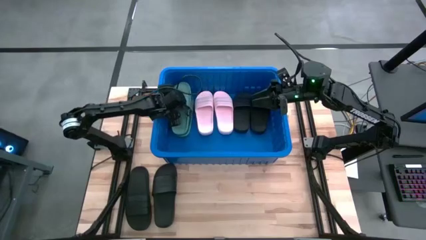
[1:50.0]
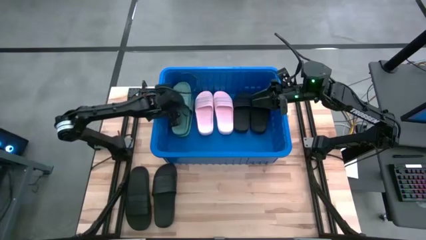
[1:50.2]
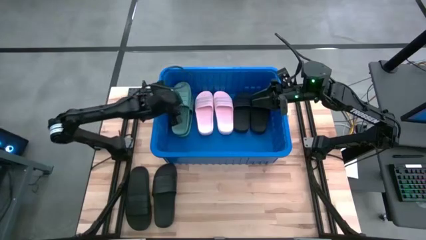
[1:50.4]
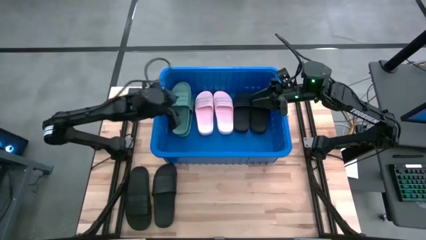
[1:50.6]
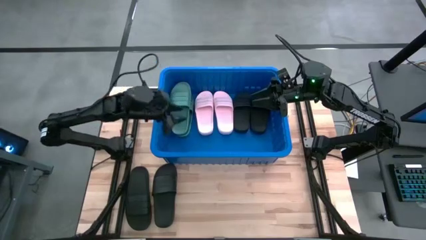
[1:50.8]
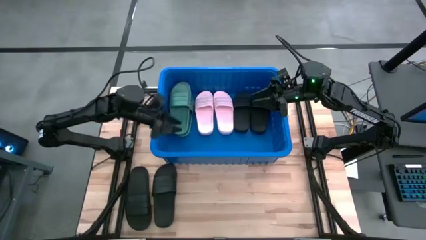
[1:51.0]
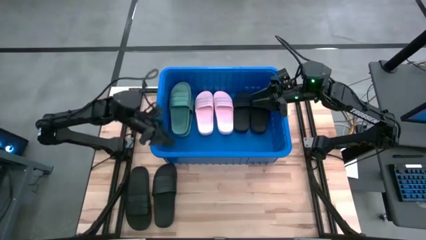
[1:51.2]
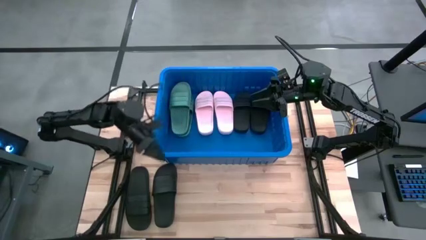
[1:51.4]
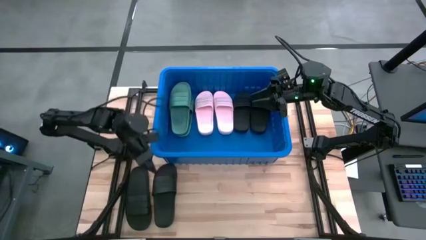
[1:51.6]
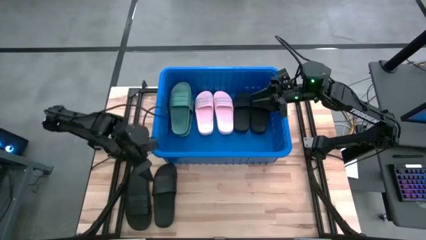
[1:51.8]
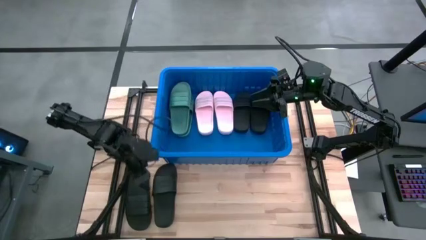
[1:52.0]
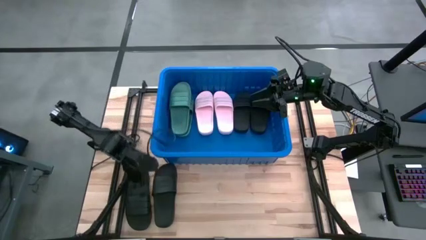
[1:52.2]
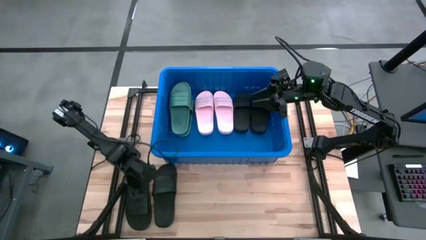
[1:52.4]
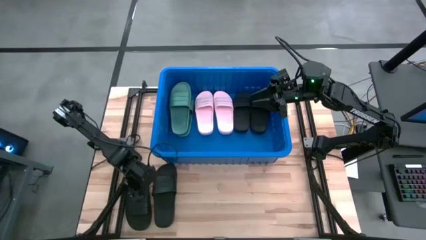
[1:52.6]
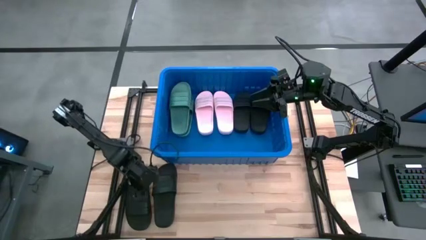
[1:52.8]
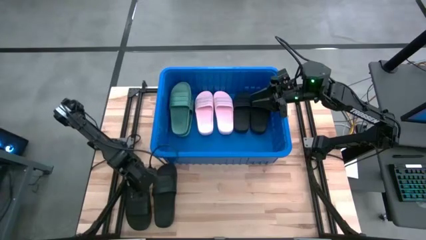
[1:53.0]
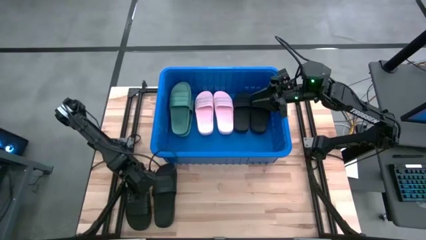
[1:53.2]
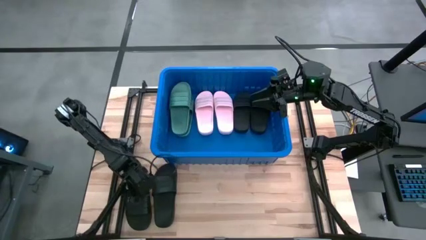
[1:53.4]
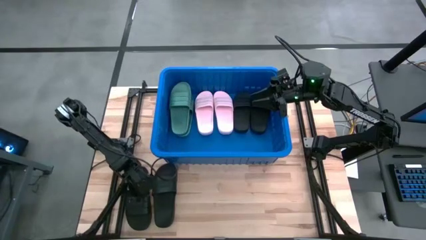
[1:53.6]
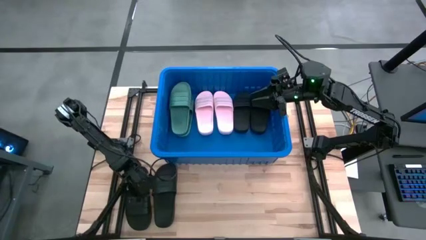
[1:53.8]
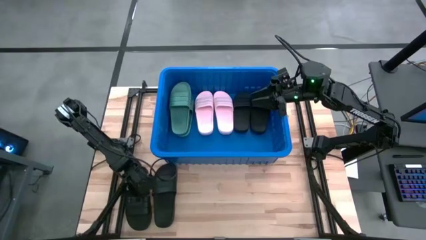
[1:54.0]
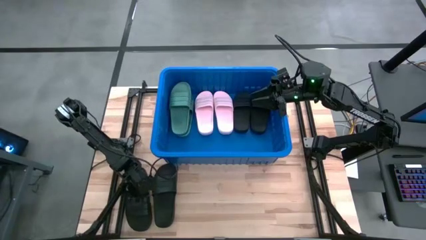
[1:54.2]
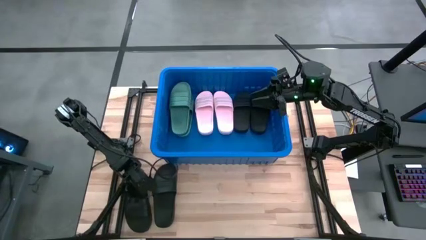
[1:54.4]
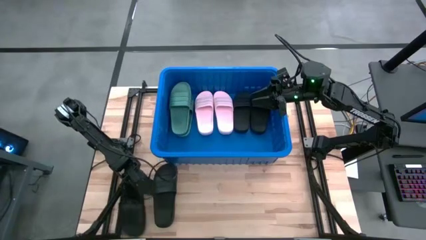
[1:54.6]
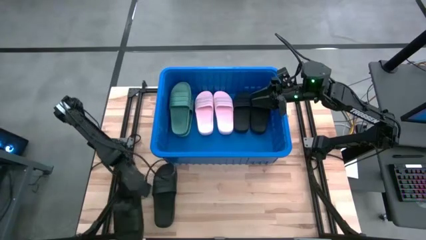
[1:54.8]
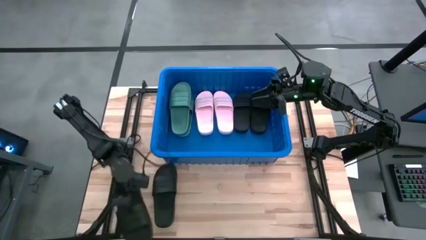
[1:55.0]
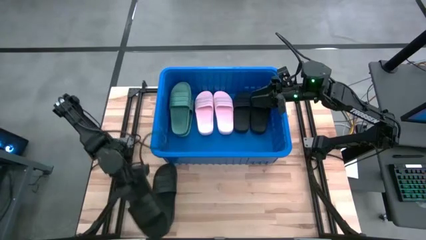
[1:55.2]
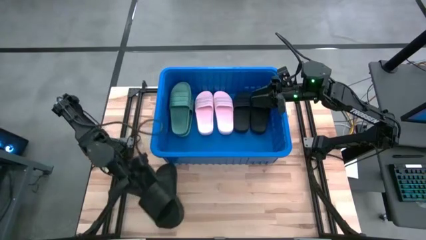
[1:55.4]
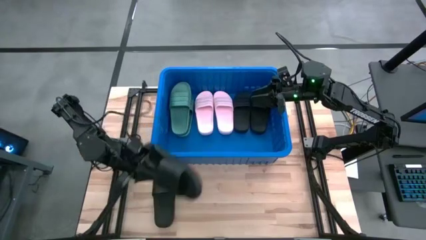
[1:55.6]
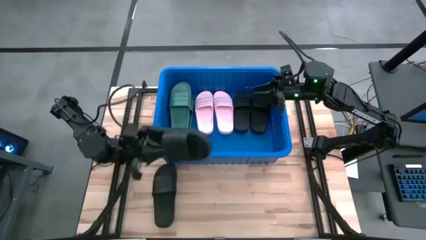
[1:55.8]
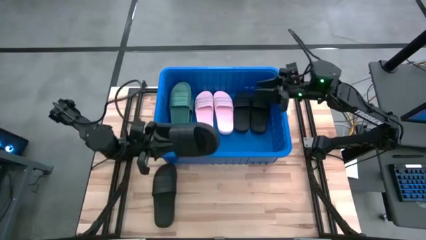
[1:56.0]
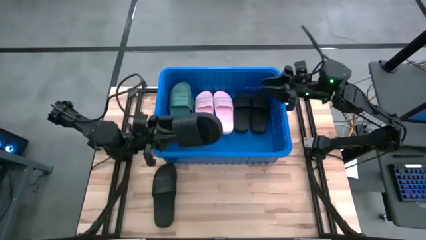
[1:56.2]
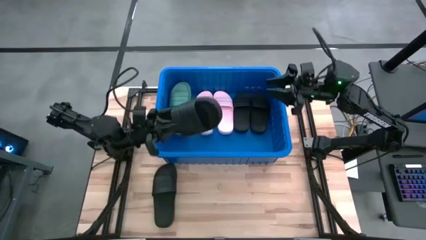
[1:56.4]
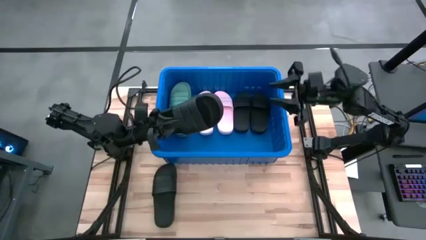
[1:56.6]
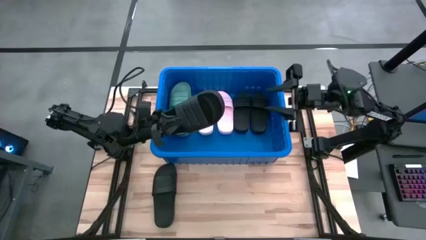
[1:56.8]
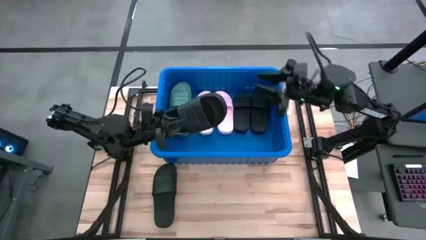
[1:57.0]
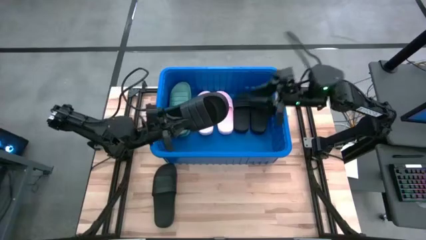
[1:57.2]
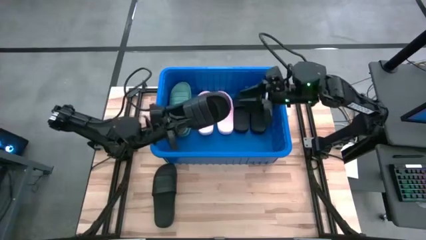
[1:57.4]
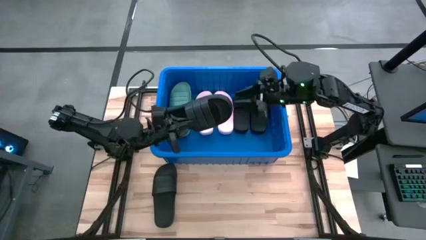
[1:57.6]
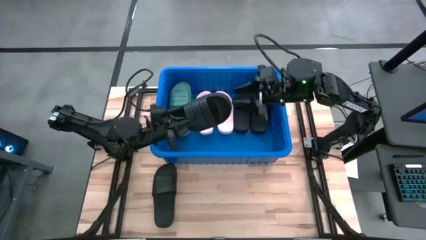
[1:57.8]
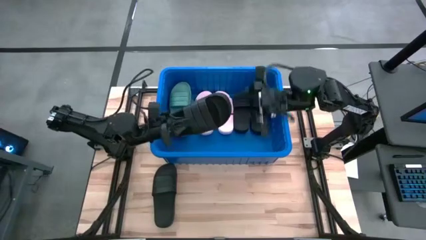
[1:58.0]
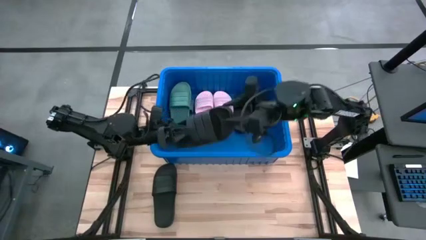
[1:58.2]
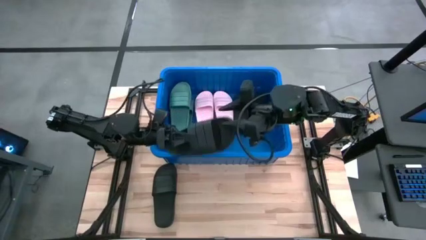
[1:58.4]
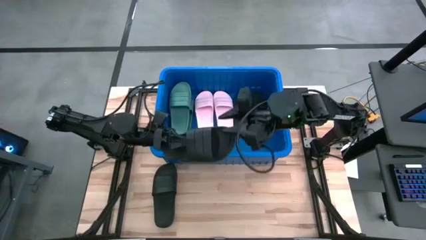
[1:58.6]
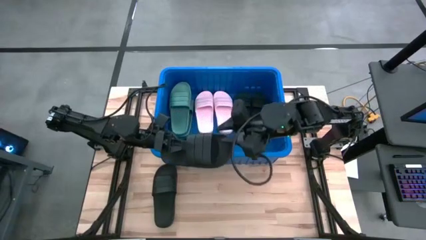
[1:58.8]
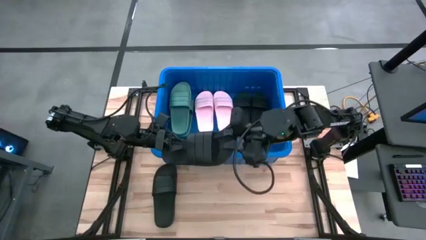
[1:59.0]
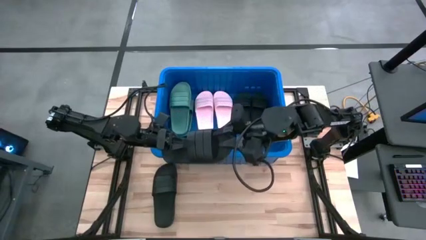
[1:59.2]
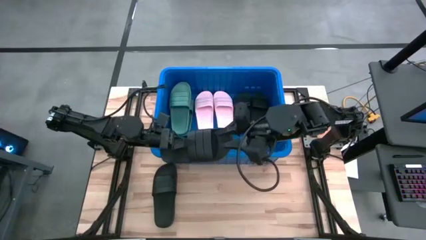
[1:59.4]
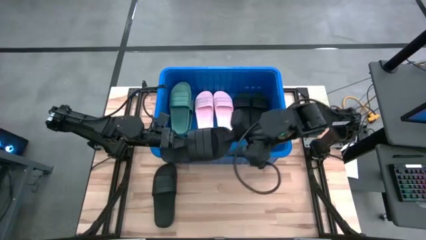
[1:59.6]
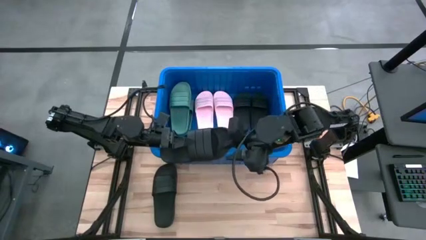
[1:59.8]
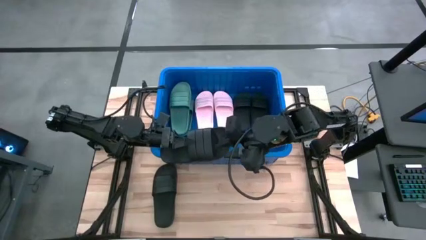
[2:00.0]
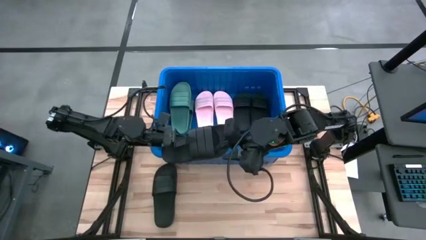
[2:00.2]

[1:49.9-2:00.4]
Task: Pick and place slides into bin
Put the black slipper into the blue bin

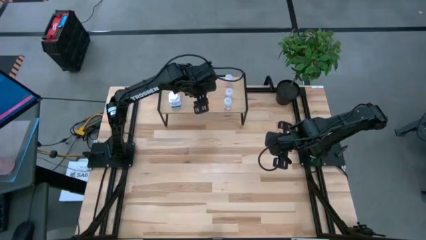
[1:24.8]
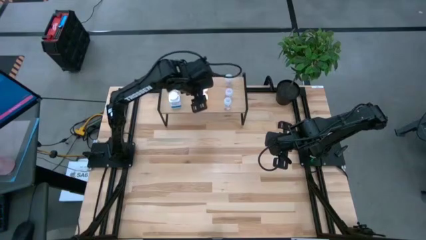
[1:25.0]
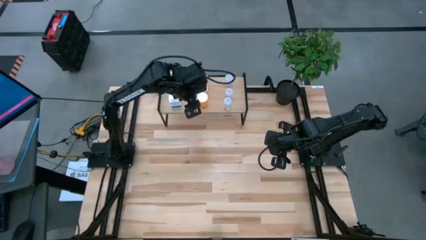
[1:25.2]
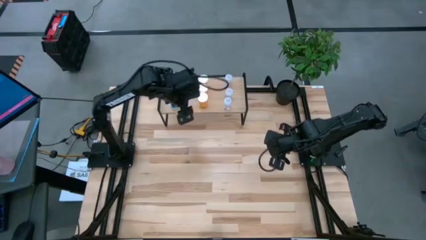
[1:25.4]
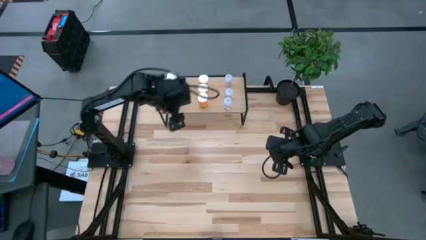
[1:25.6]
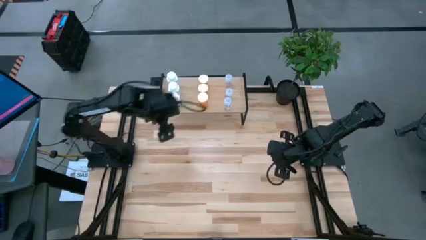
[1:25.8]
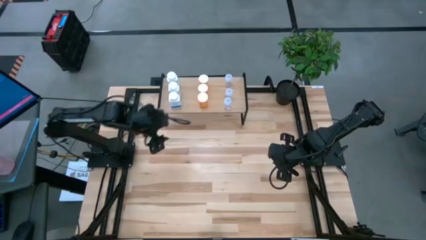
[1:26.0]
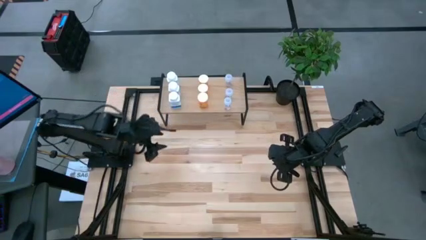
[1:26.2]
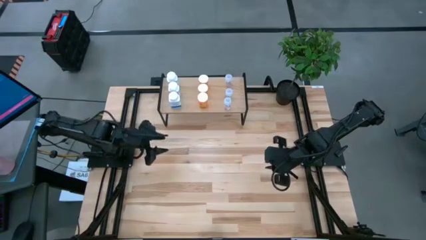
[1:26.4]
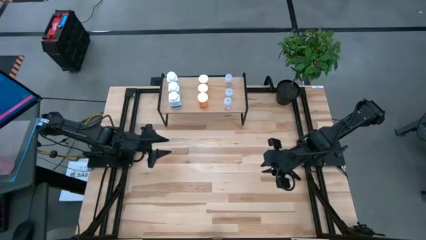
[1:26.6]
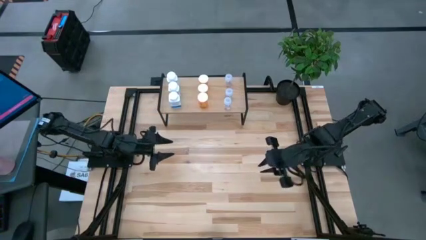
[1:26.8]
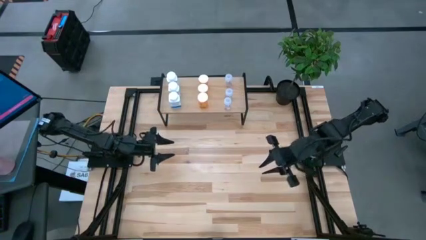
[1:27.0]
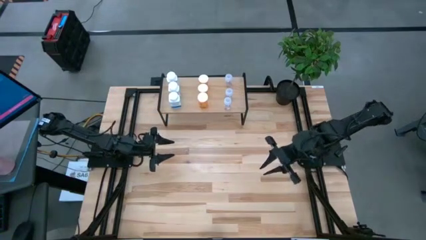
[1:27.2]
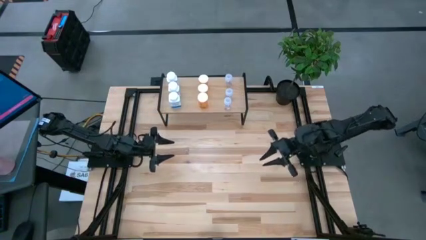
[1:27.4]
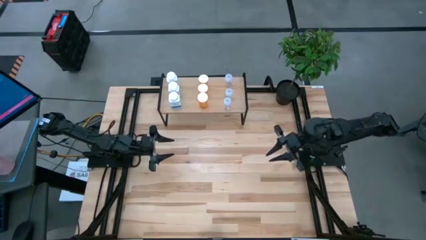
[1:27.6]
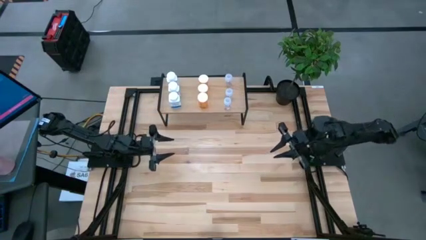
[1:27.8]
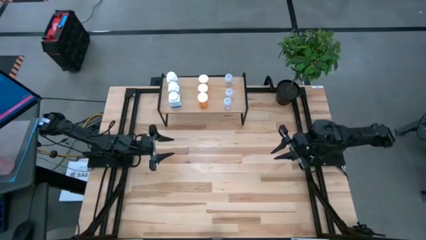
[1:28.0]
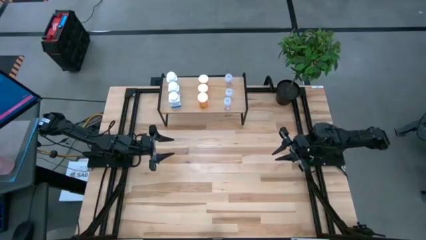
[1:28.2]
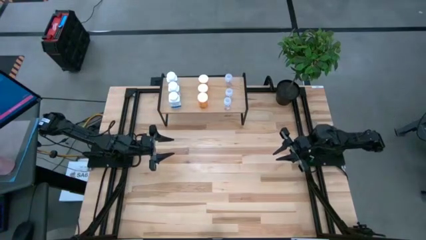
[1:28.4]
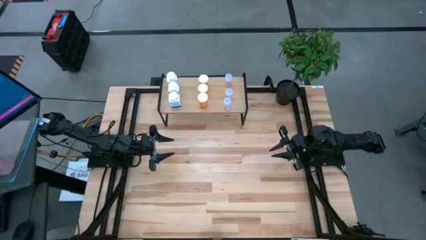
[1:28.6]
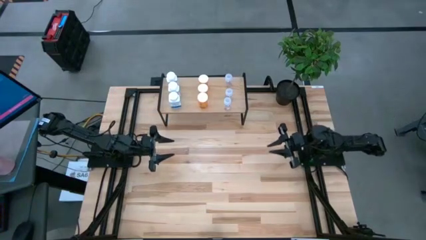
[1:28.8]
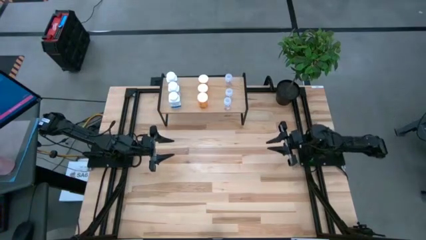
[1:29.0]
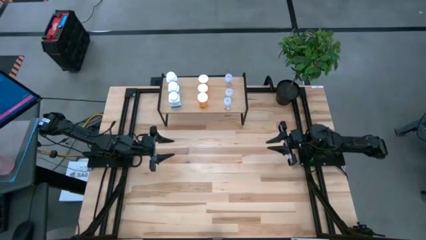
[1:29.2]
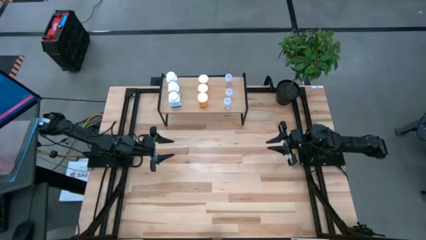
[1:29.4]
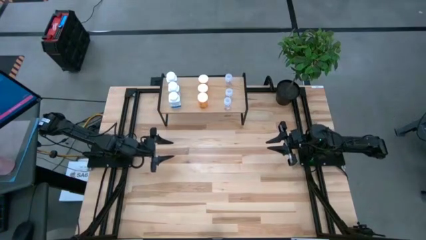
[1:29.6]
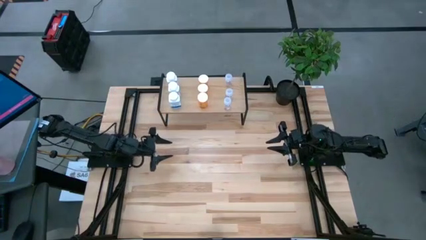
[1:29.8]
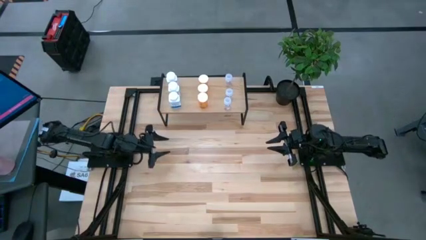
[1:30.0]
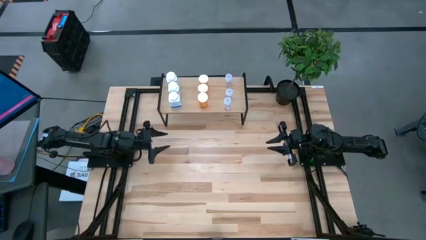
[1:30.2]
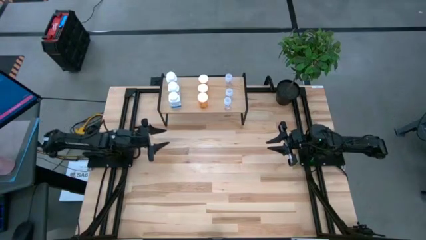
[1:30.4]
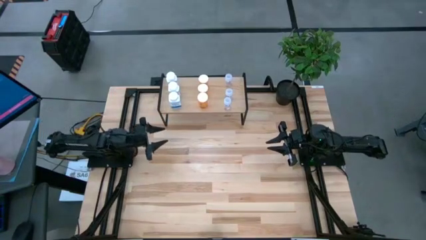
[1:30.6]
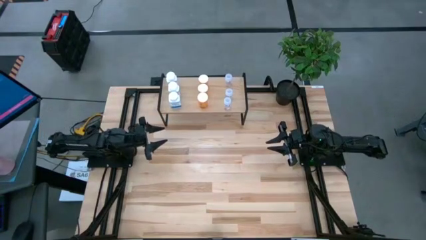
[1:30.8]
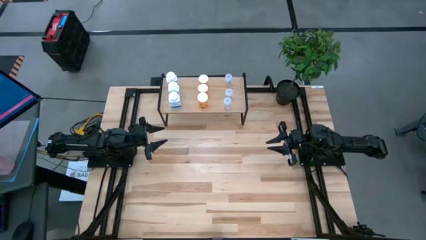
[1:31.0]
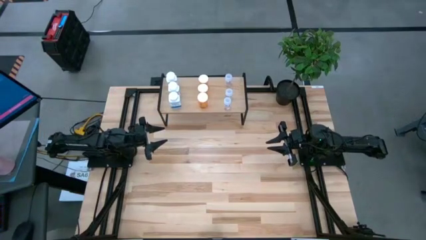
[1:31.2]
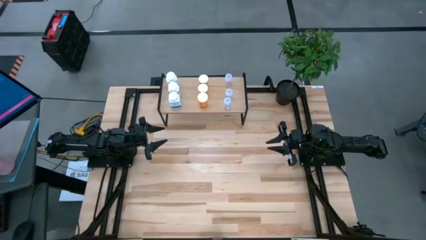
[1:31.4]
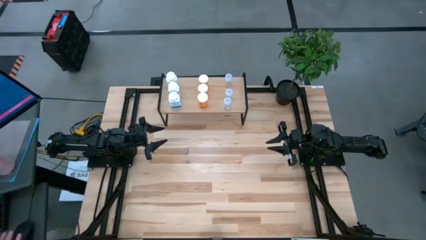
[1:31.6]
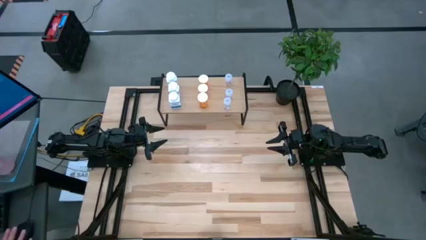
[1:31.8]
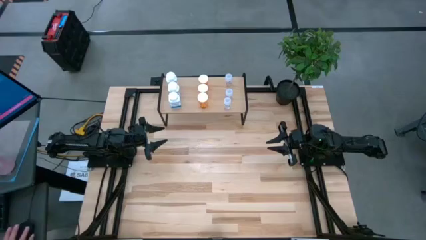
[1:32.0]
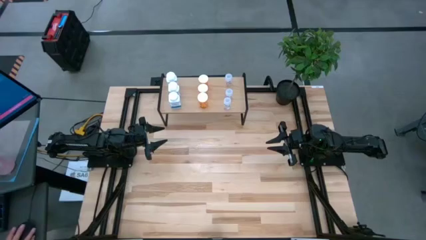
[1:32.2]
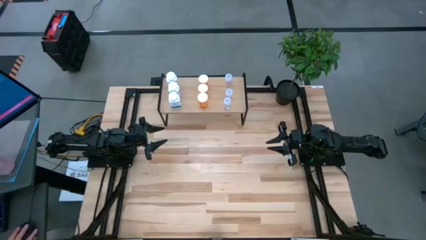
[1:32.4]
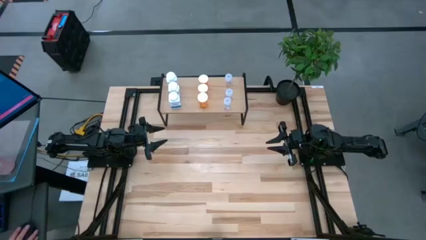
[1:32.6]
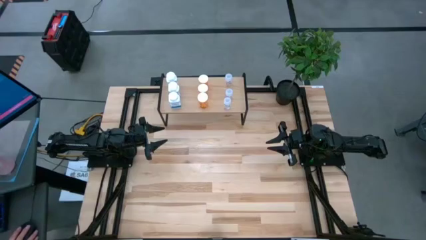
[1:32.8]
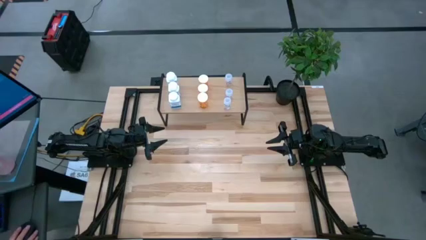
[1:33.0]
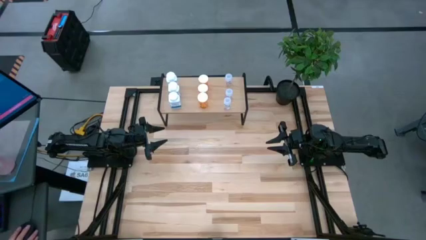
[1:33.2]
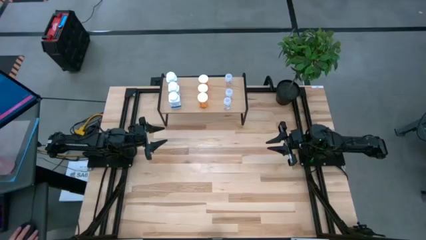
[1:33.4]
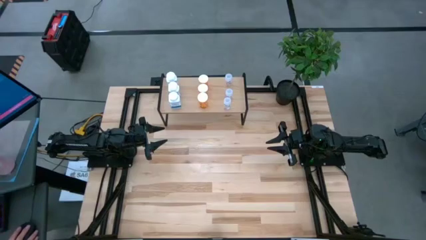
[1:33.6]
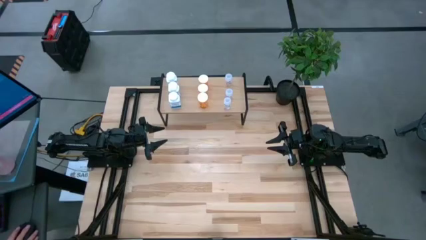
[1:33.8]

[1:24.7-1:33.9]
Task: Pick and place medicine bottles onto shelf by color
Return to Home Position
